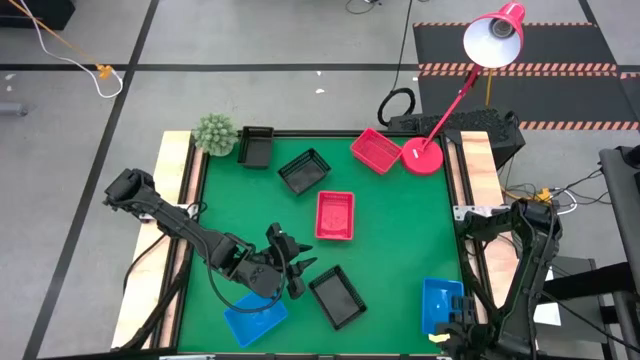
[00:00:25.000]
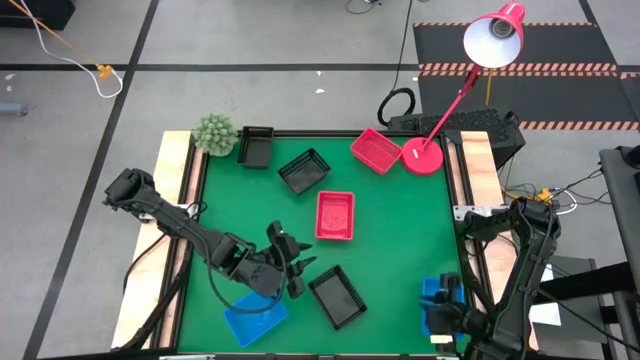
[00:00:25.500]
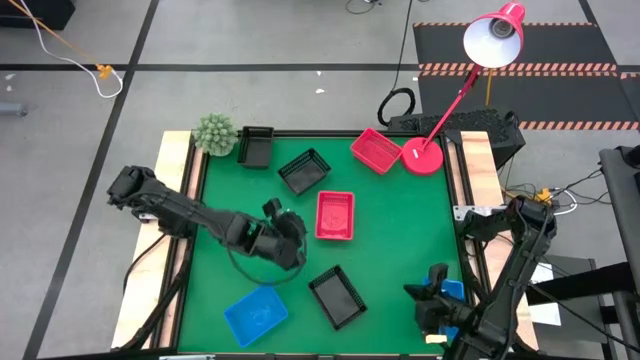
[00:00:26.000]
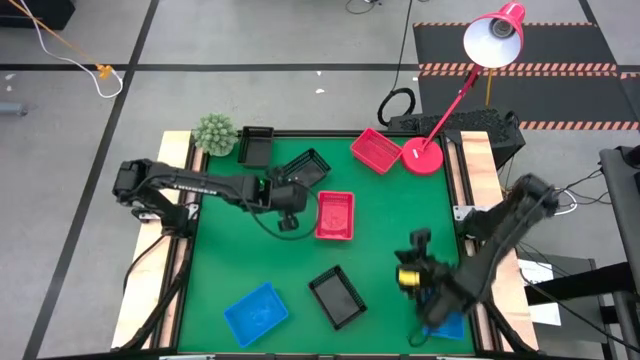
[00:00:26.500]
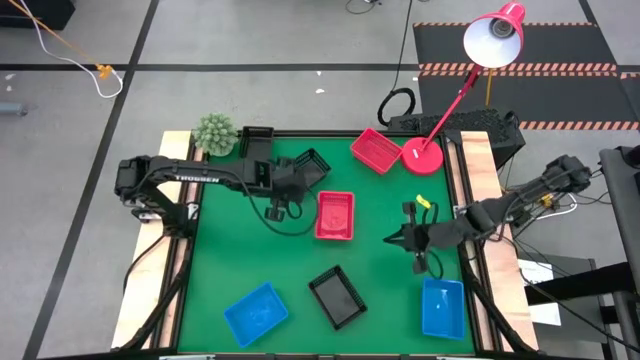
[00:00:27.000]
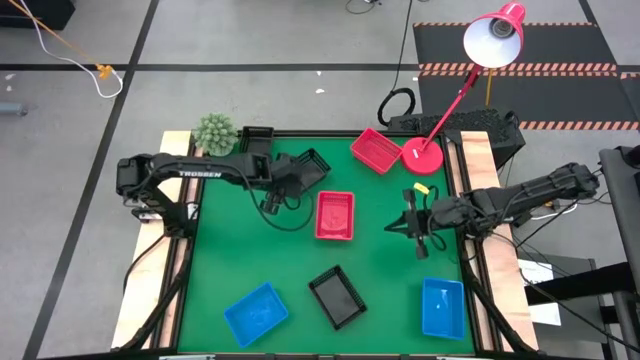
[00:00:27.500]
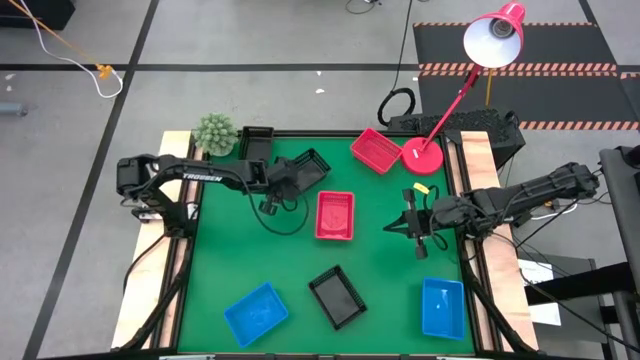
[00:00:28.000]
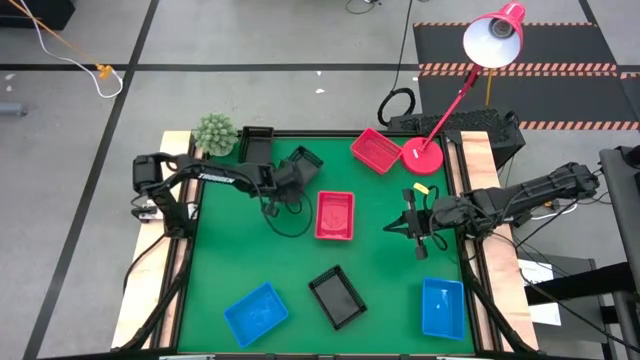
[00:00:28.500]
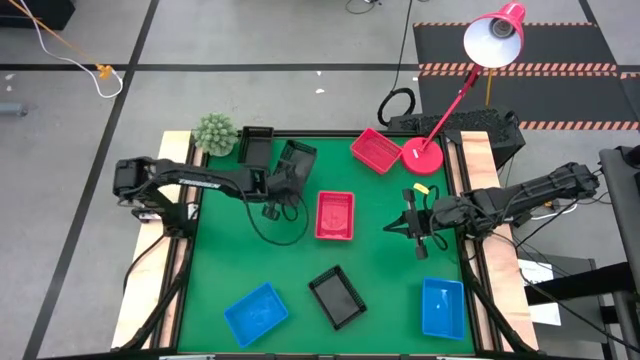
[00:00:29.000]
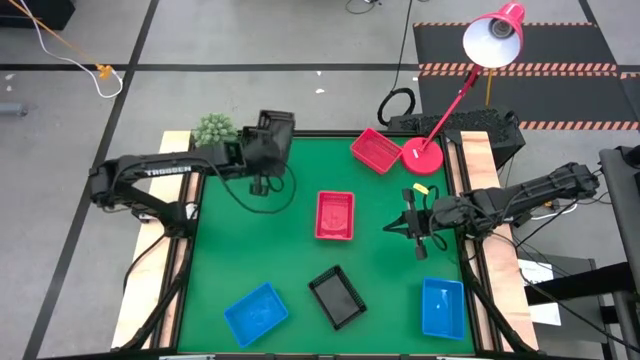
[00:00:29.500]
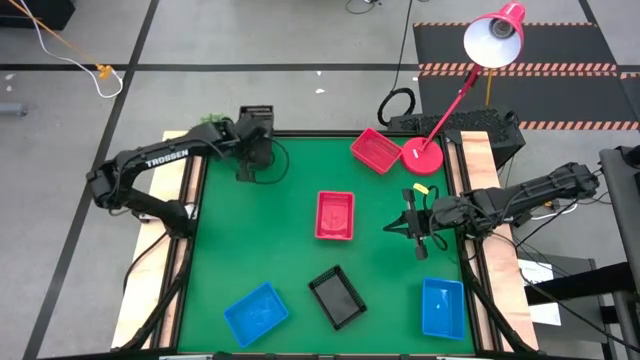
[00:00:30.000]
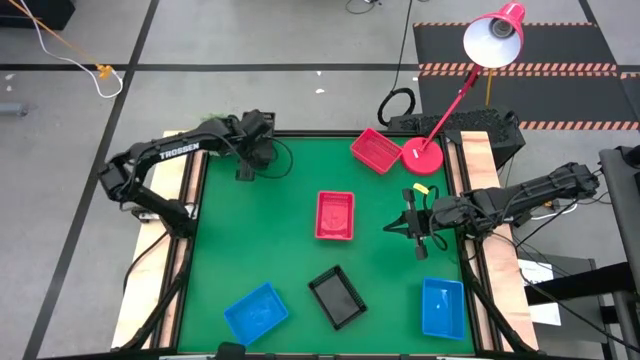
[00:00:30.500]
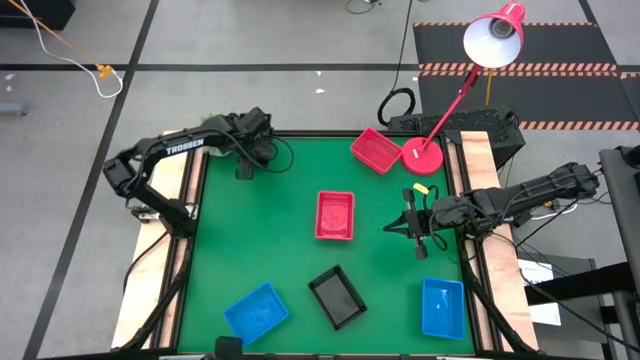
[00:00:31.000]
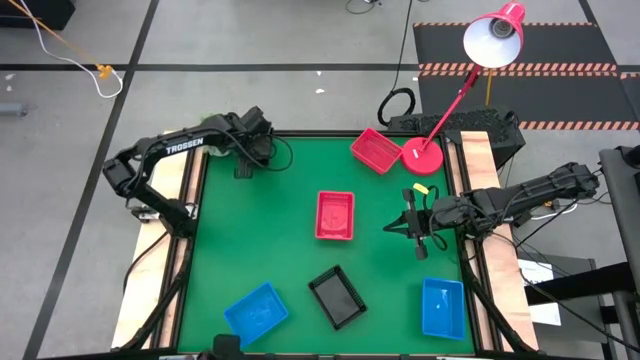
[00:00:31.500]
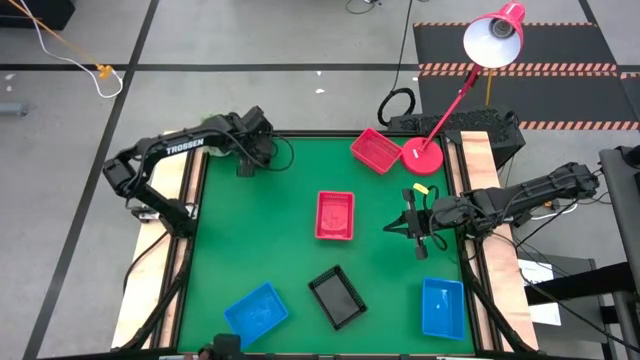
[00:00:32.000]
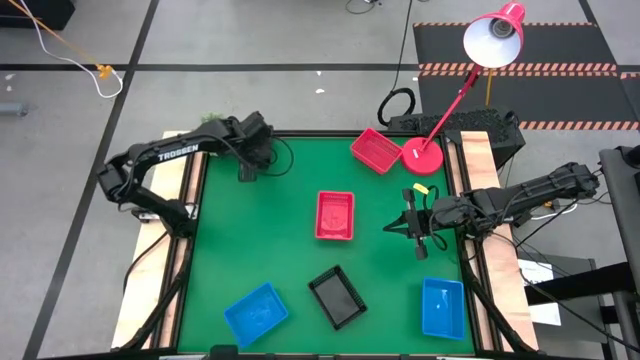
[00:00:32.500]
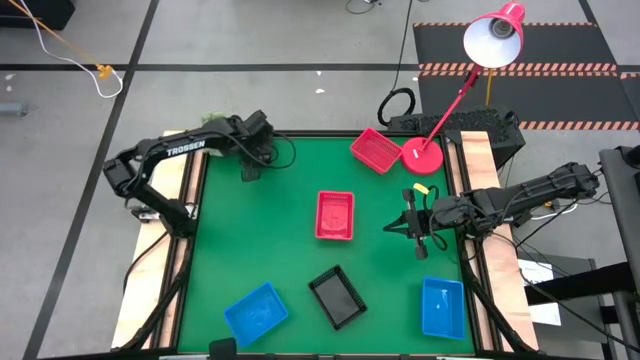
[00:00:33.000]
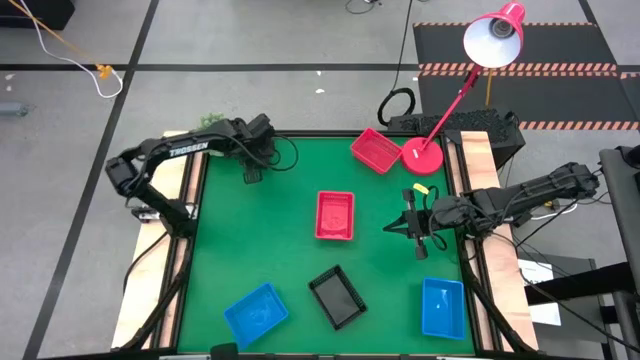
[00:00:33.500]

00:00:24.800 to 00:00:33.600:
Stack the top right black bin on the other top left black bin

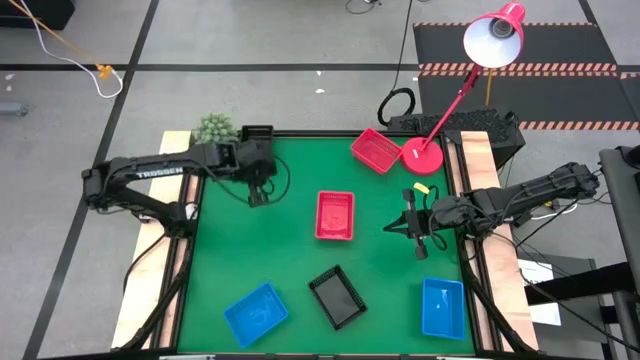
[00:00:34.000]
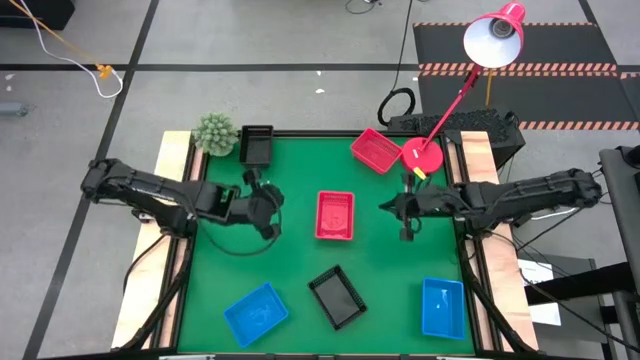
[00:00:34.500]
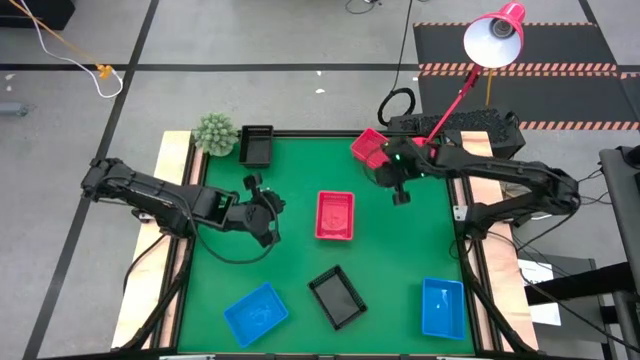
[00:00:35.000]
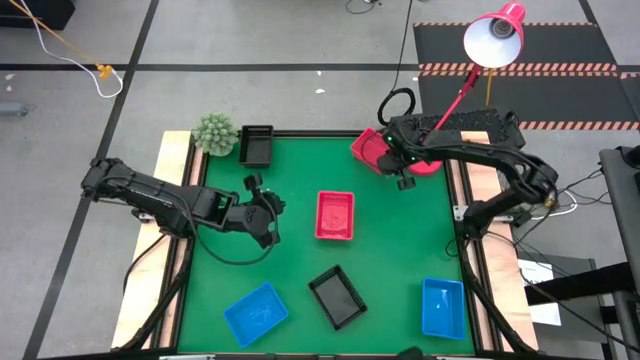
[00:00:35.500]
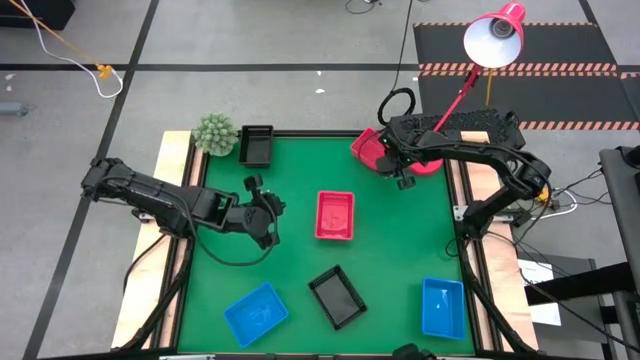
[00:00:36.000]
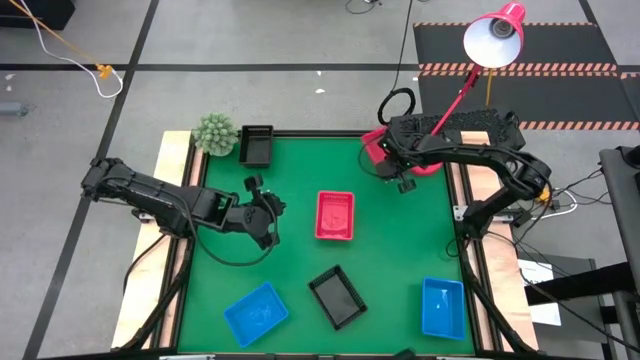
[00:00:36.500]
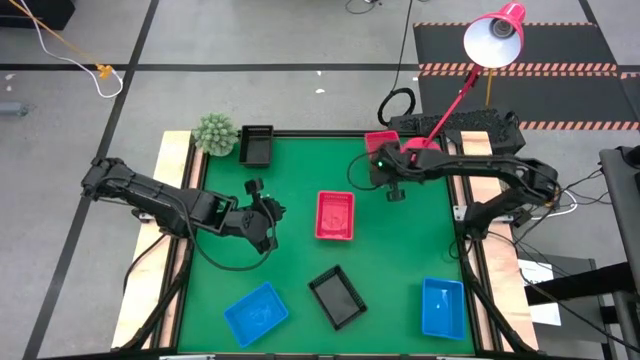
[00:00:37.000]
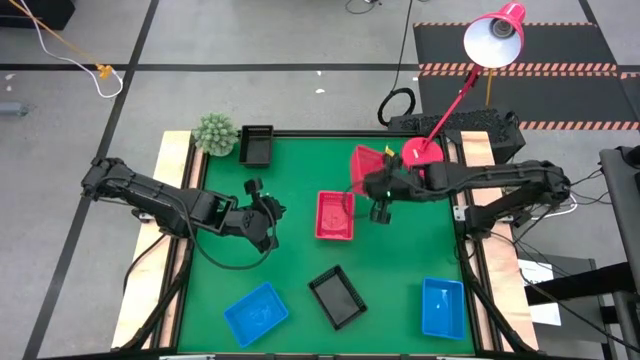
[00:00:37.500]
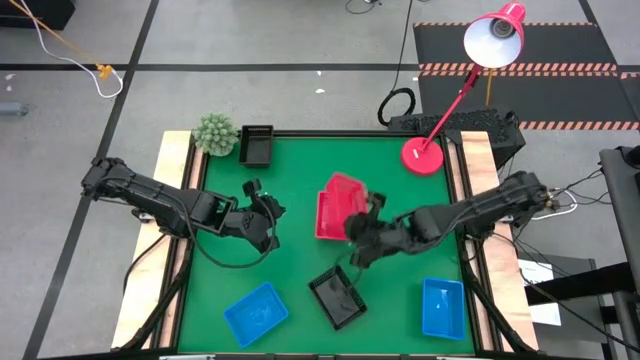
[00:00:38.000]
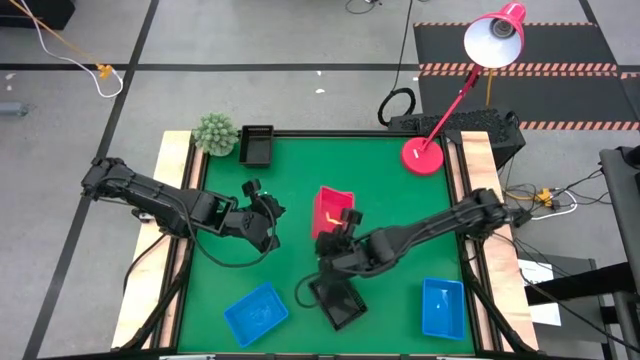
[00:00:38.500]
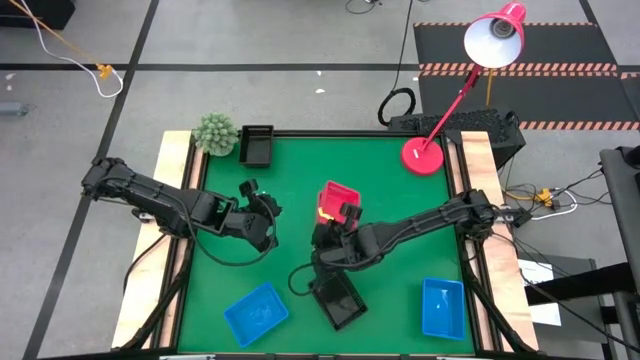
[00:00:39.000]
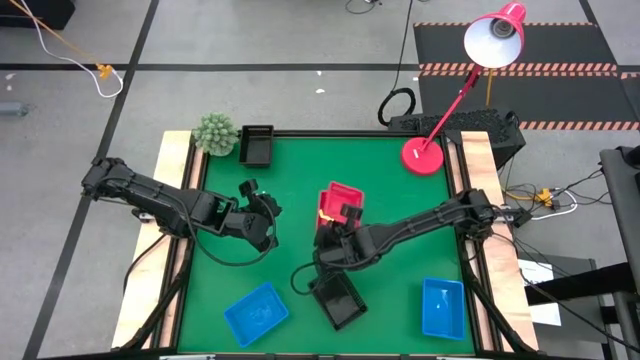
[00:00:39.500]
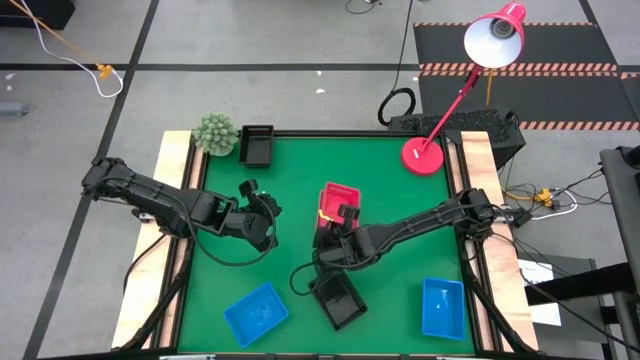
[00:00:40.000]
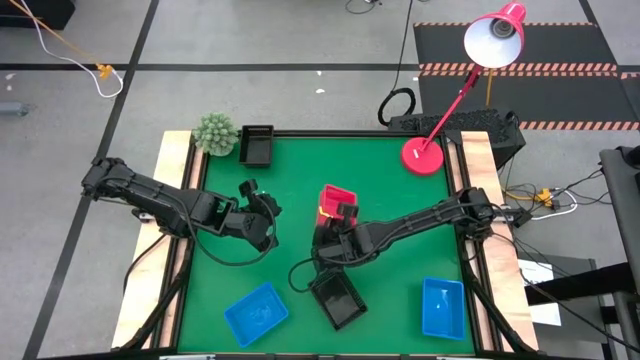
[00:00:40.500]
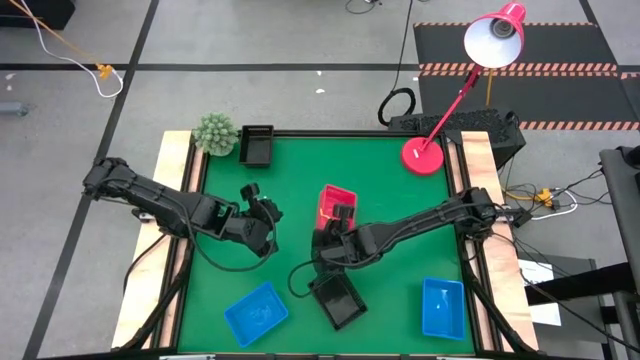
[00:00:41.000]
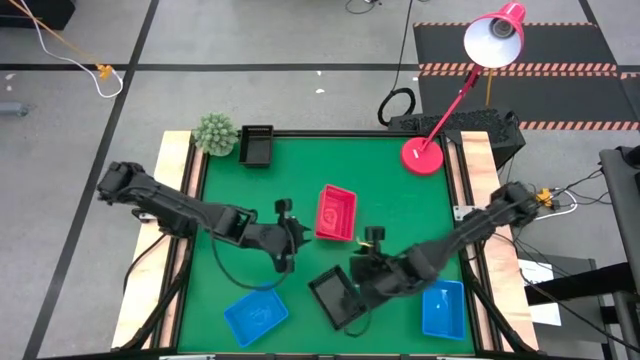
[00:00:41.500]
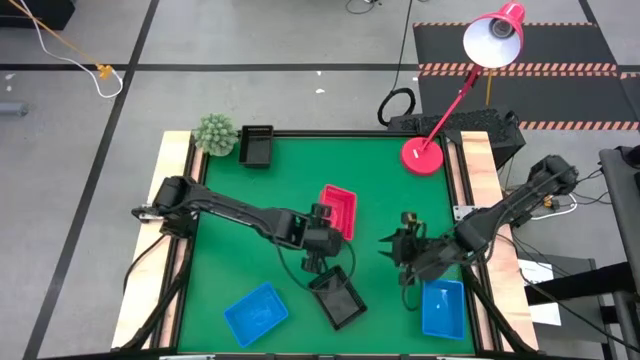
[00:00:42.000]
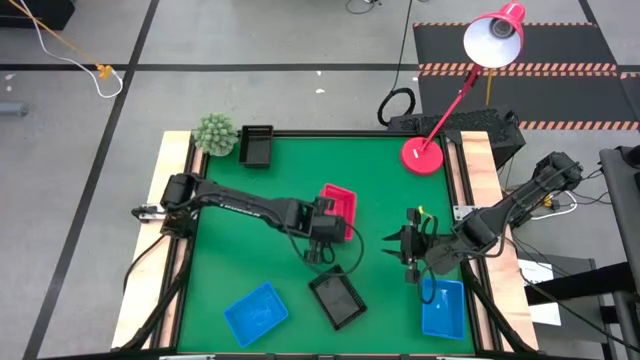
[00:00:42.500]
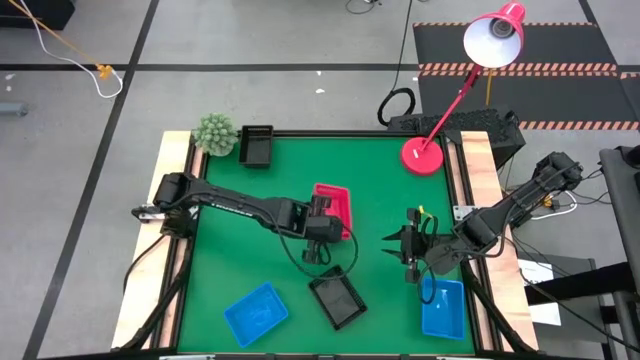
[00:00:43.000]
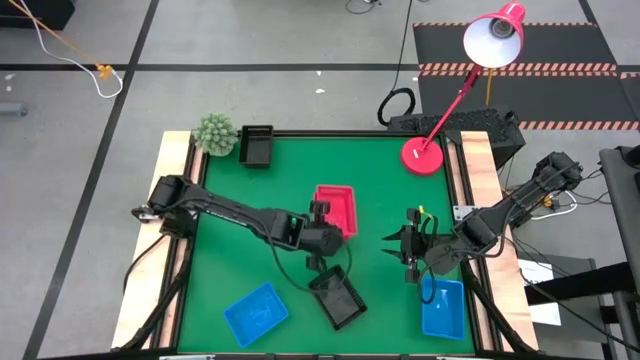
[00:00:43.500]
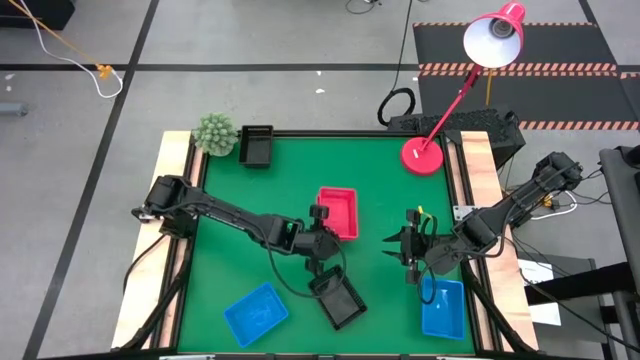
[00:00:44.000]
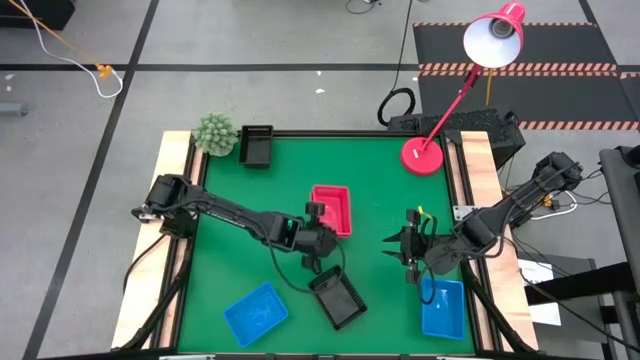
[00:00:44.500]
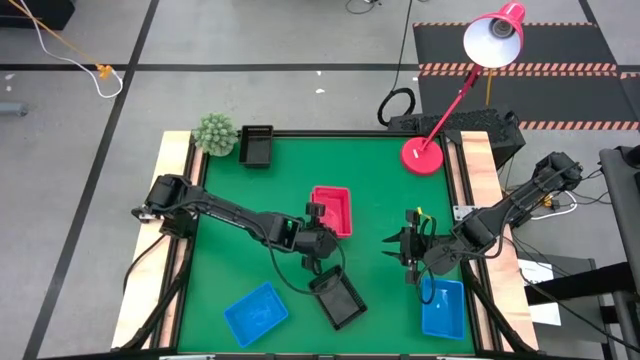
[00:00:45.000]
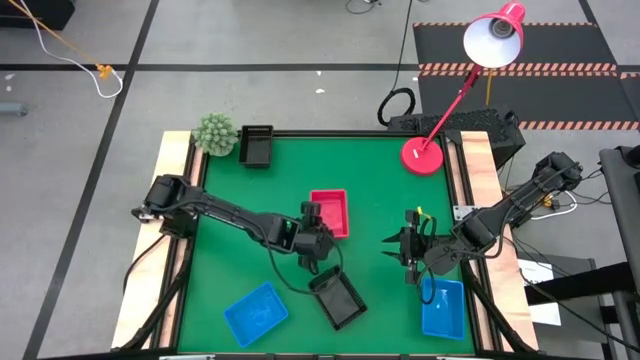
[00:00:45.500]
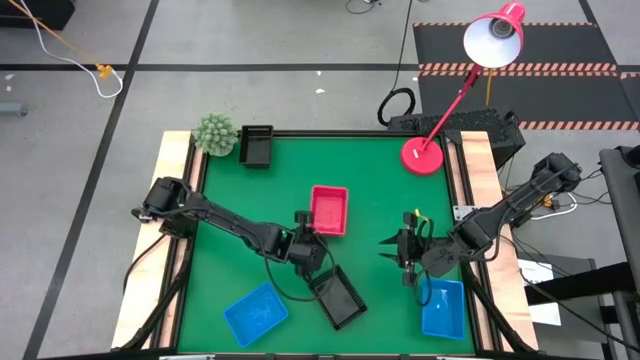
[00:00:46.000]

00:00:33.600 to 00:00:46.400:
Stack the top red bin on the stacked red bins
